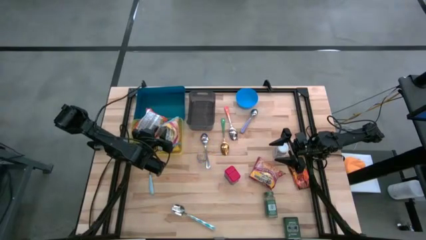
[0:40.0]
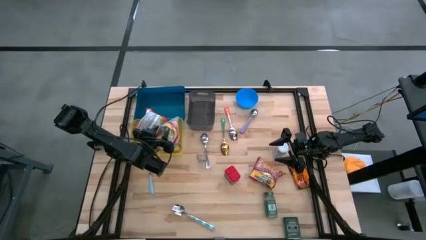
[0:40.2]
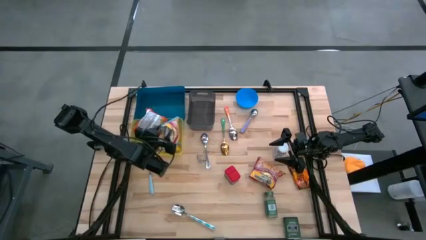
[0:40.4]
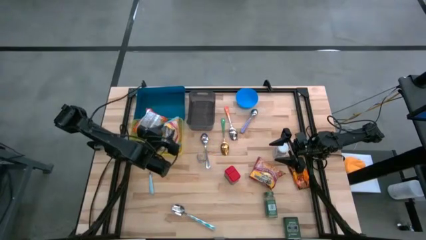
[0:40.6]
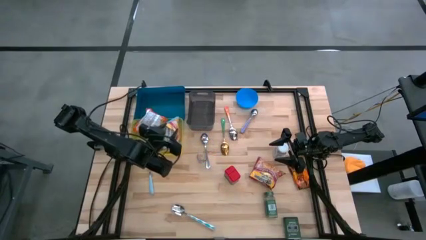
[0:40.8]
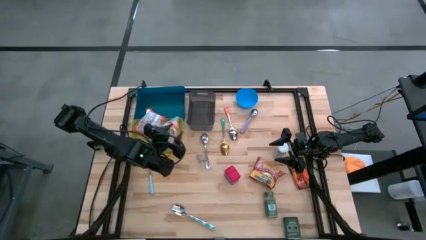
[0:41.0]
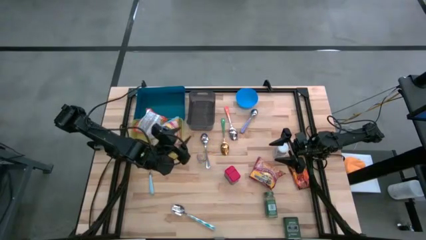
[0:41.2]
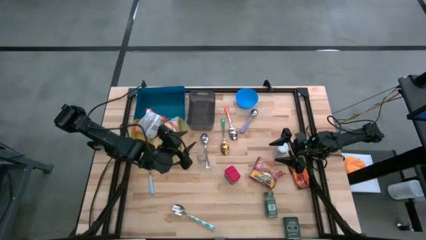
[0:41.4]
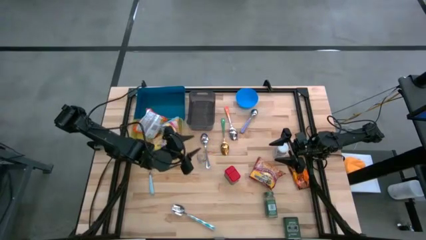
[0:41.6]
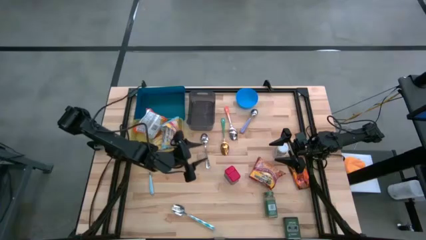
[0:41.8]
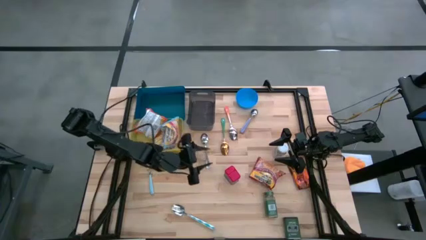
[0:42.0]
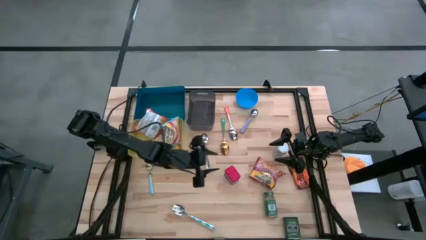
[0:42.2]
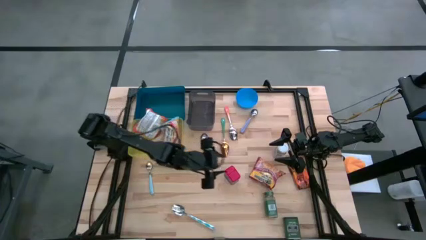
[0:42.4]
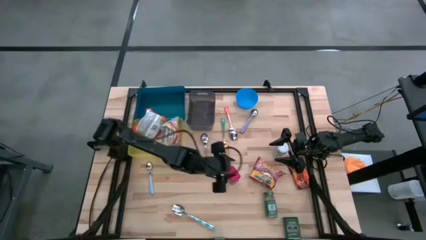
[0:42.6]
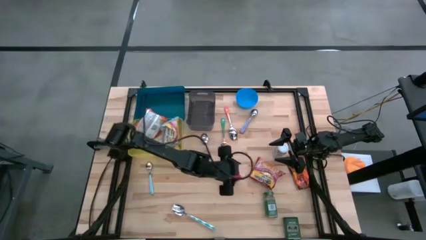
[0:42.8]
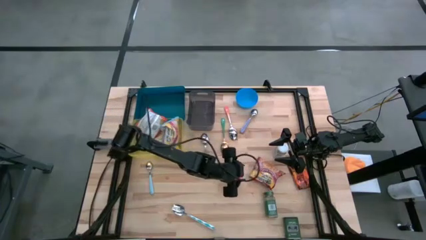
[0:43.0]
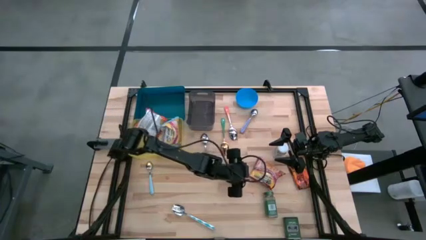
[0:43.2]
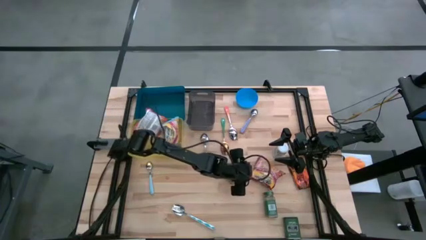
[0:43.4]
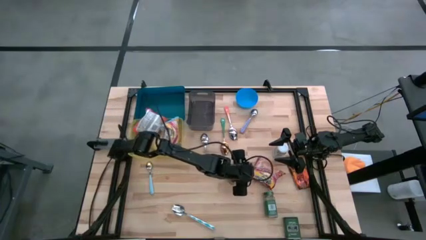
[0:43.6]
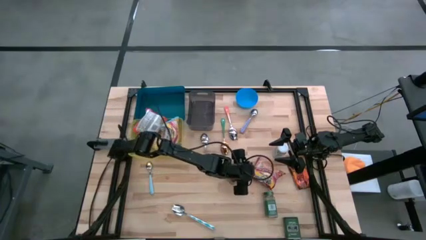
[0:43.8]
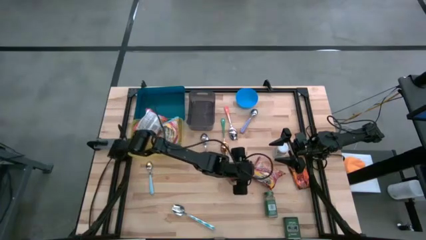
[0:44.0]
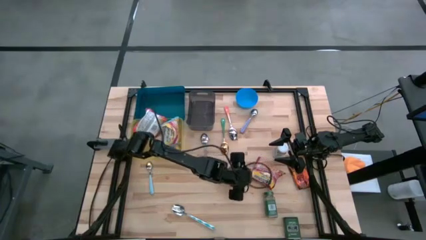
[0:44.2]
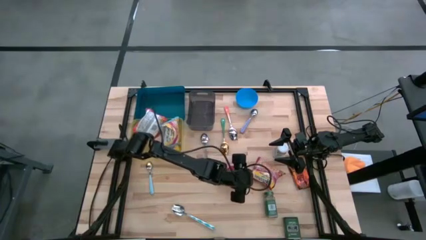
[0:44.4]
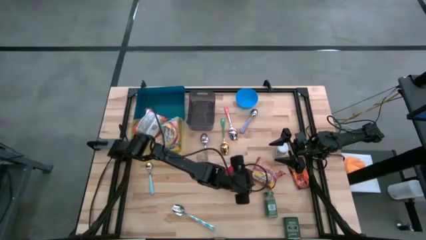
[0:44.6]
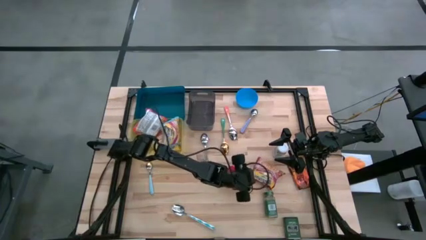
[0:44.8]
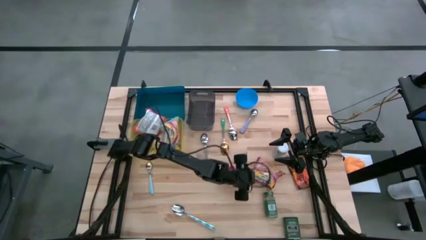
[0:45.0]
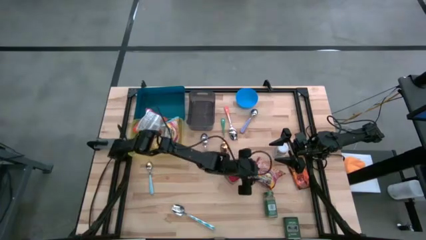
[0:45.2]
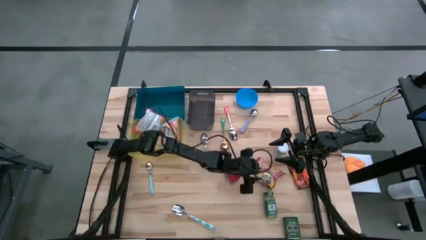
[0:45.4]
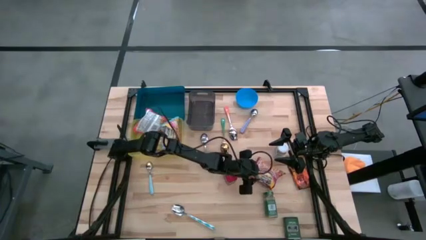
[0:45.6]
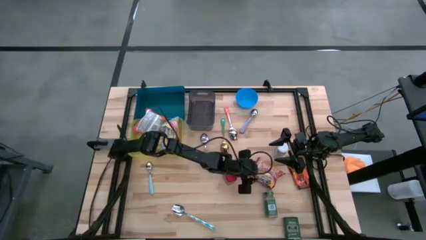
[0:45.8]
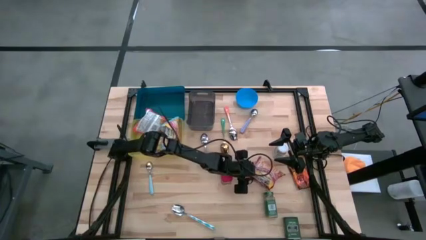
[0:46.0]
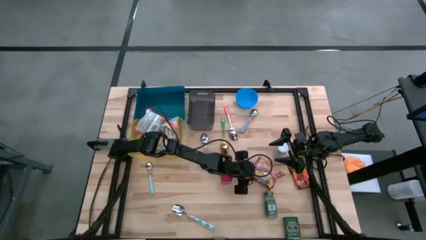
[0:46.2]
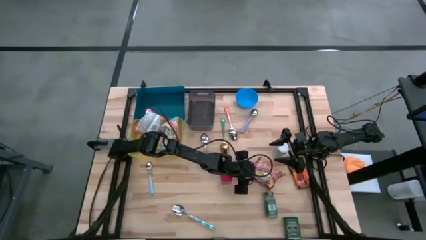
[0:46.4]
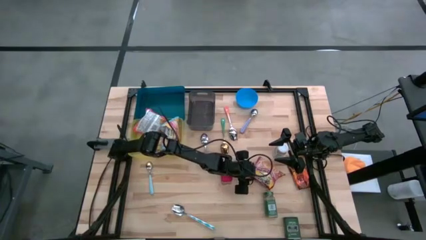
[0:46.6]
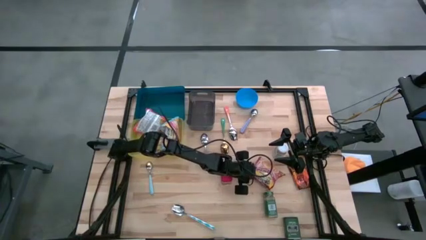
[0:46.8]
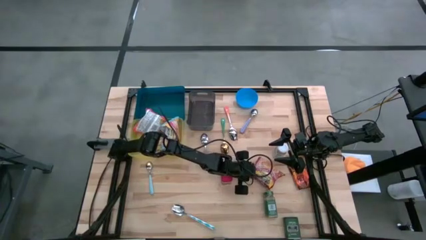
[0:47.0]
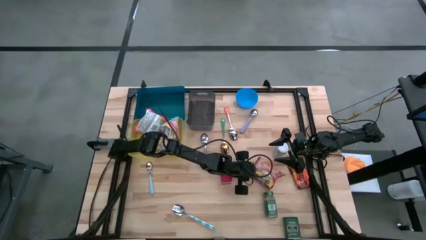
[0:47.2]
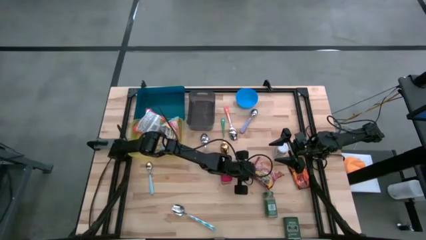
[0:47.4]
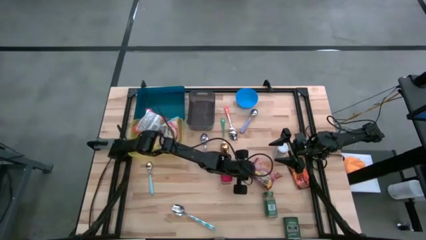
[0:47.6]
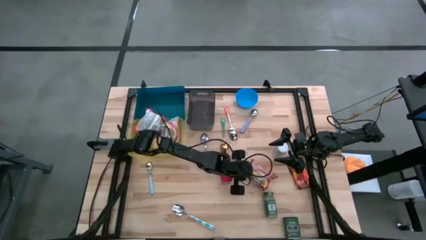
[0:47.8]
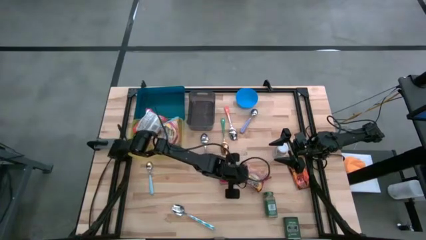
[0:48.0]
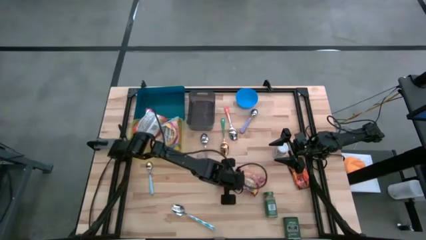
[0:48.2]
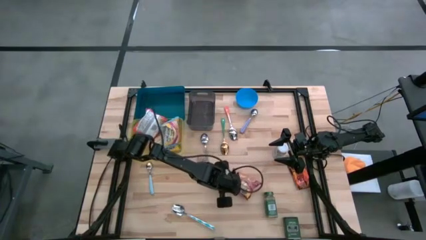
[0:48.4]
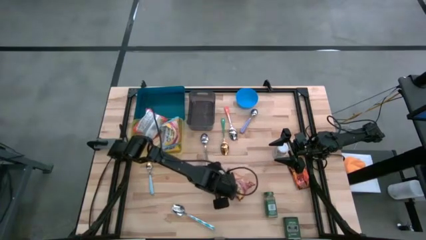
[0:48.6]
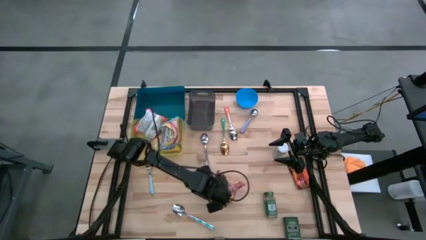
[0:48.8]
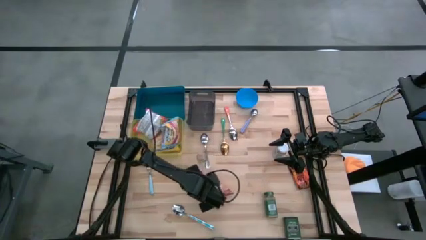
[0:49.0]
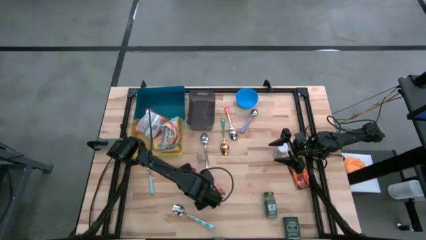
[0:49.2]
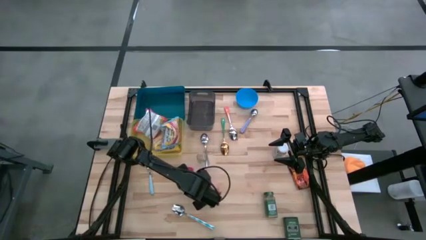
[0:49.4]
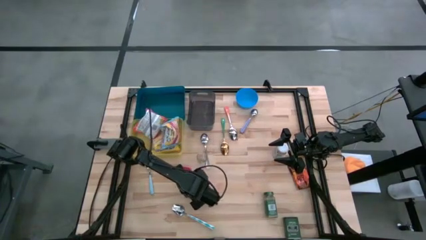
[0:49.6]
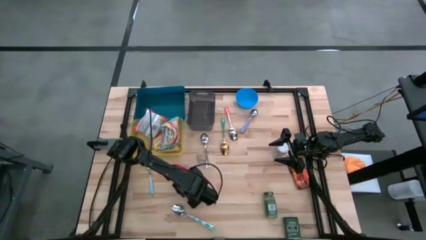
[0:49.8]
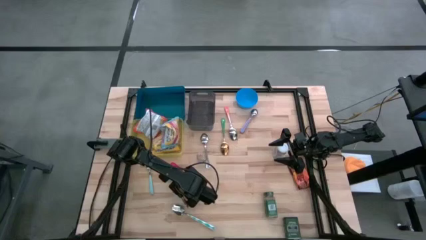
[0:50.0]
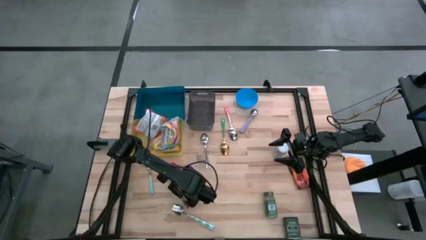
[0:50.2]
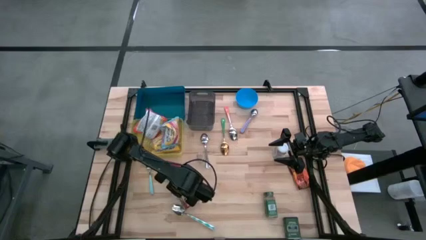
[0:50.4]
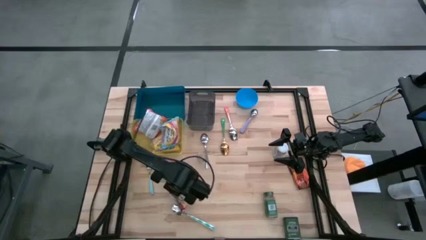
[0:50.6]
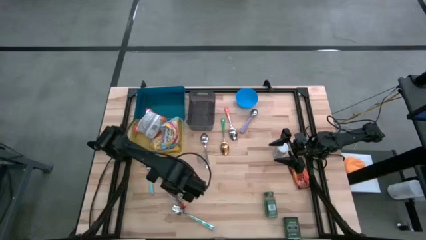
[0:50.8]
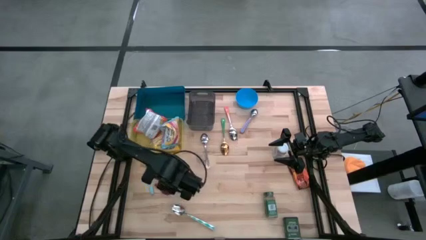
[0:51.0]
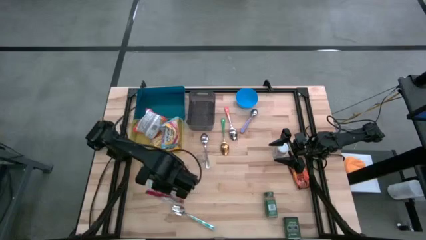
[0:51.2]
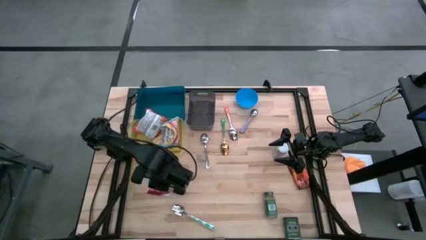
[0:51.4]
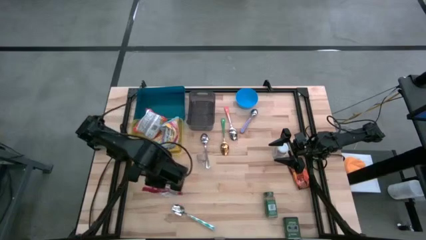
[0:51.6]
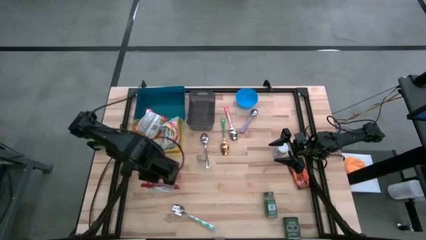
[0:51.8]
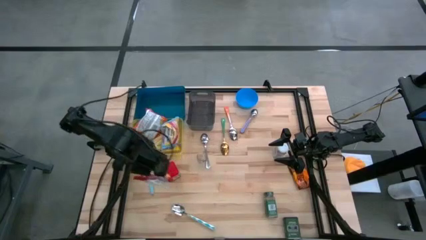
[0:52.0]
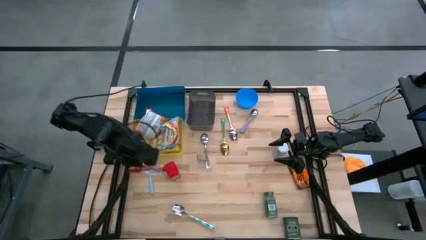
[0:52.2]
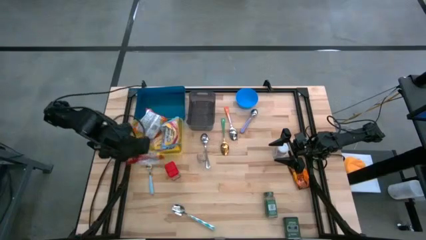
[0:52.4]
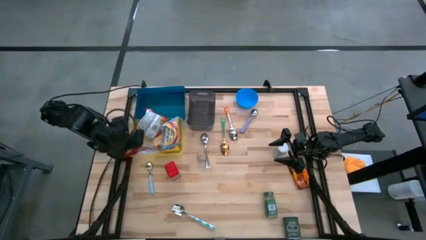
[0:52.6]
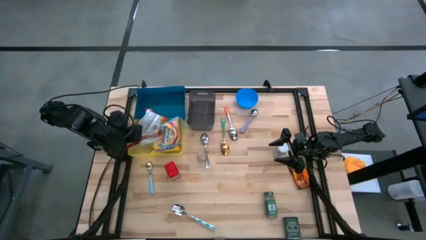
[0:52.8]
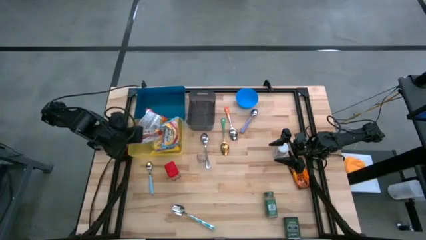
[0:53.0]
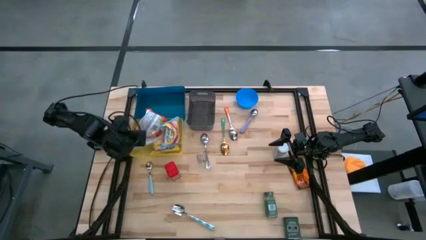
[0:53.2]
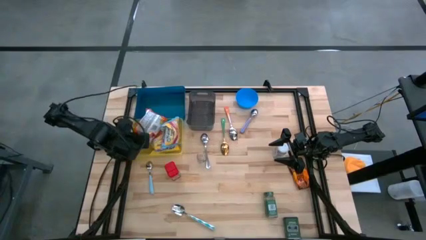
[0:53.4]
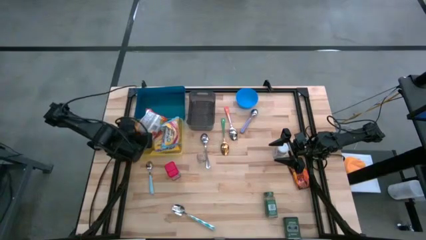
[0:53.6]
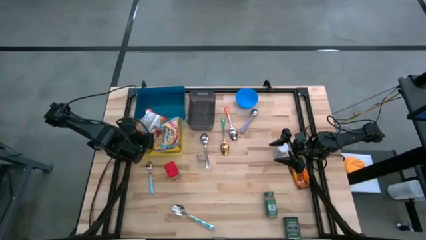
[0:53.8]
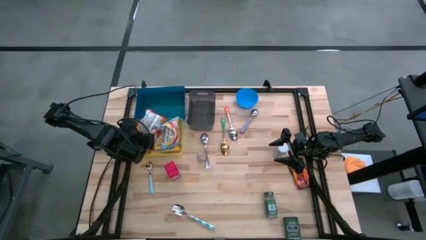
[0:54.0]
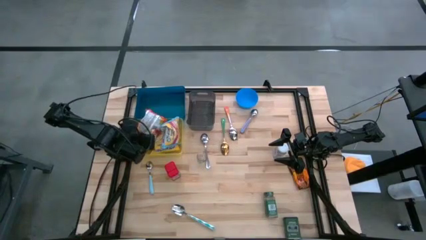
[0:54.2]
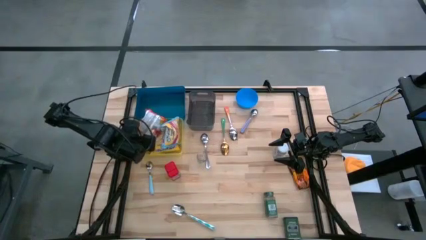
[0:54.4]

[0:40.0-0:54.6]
Put the red noodle pack into the yellow bin
